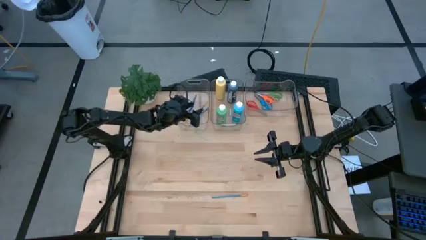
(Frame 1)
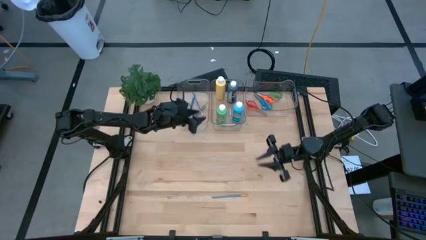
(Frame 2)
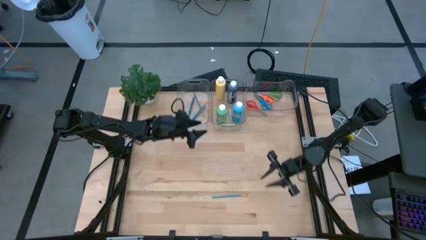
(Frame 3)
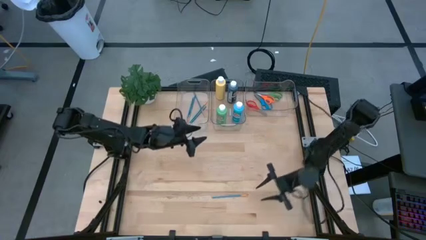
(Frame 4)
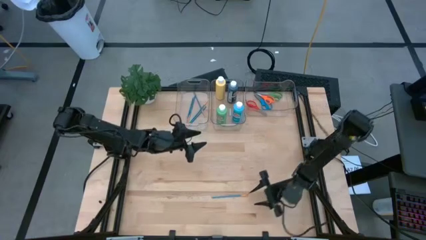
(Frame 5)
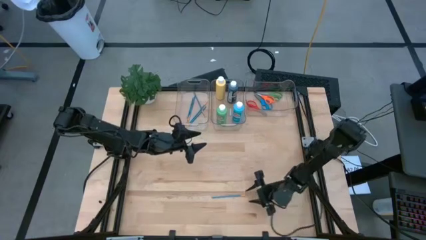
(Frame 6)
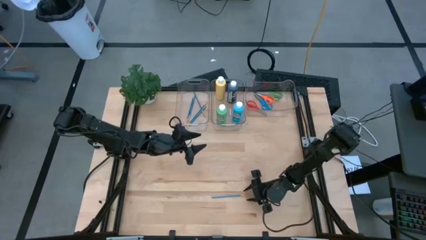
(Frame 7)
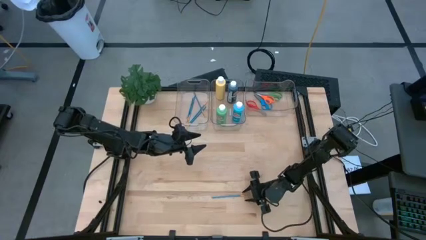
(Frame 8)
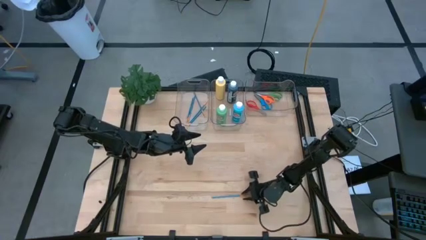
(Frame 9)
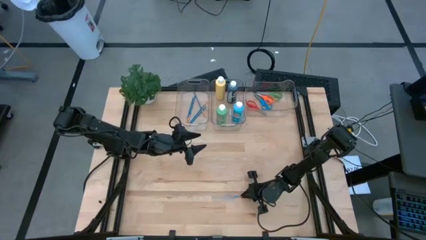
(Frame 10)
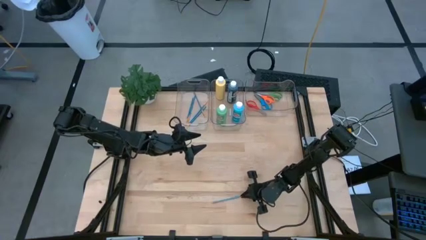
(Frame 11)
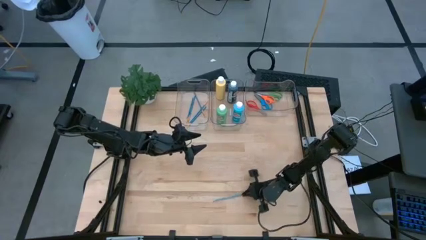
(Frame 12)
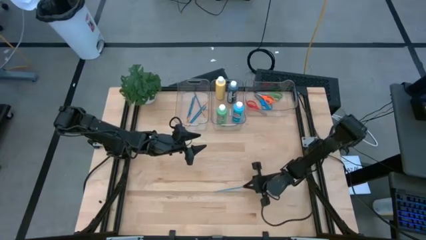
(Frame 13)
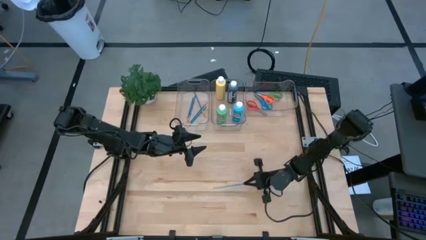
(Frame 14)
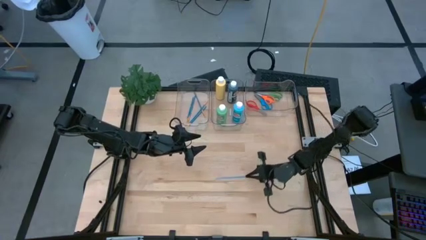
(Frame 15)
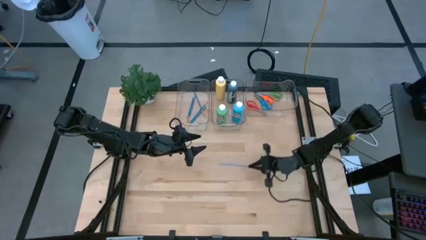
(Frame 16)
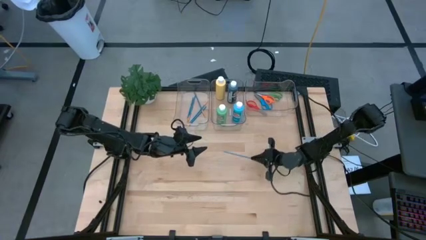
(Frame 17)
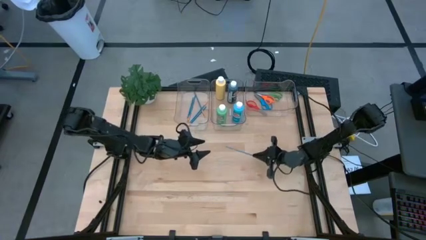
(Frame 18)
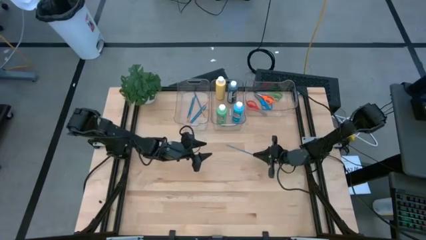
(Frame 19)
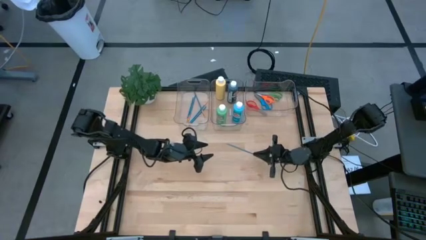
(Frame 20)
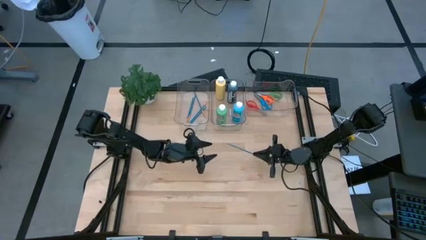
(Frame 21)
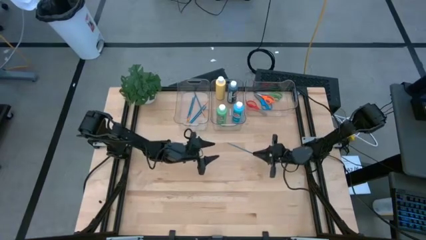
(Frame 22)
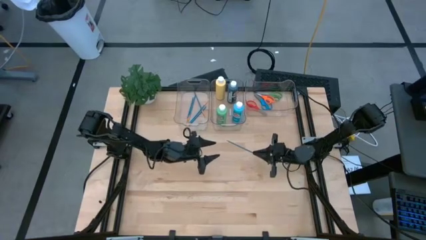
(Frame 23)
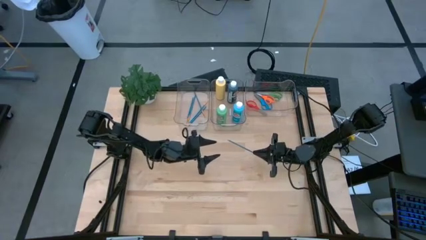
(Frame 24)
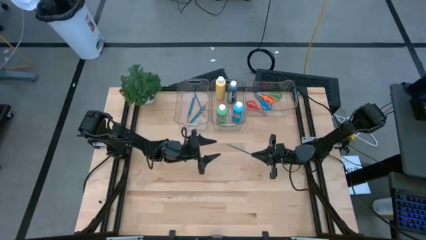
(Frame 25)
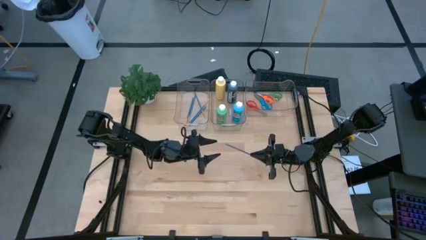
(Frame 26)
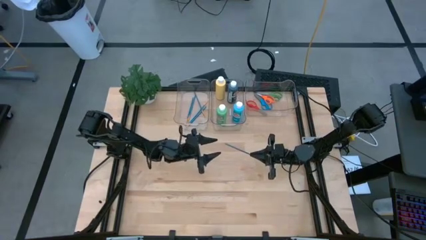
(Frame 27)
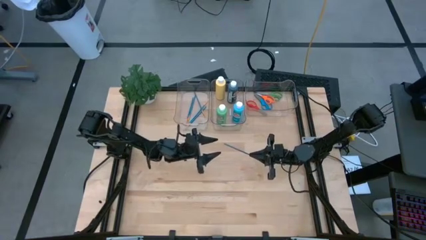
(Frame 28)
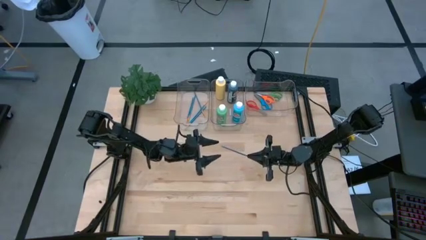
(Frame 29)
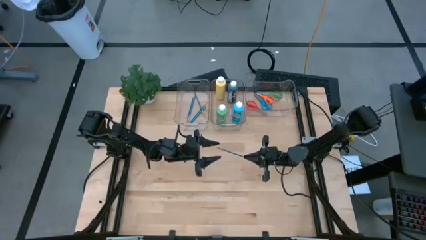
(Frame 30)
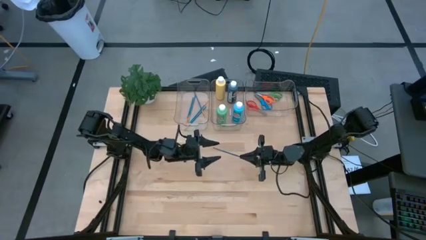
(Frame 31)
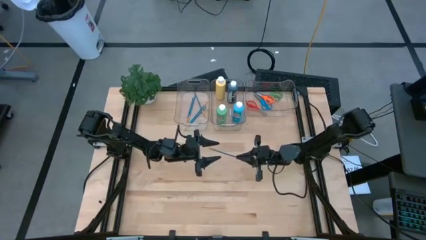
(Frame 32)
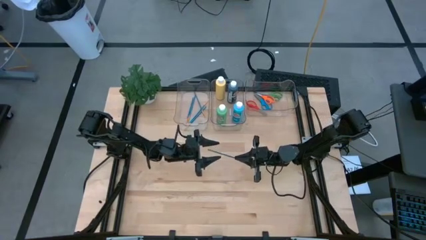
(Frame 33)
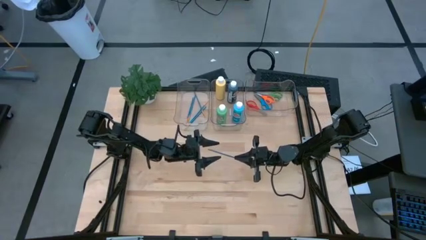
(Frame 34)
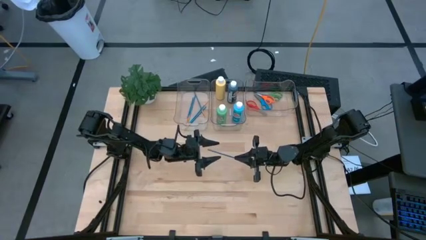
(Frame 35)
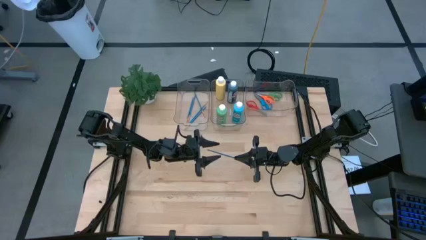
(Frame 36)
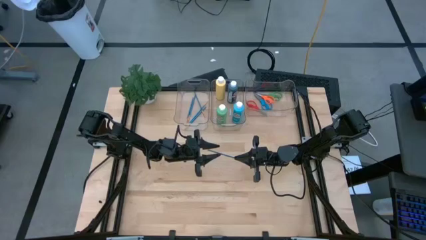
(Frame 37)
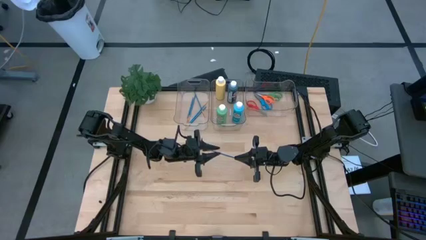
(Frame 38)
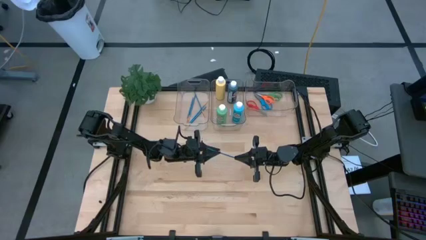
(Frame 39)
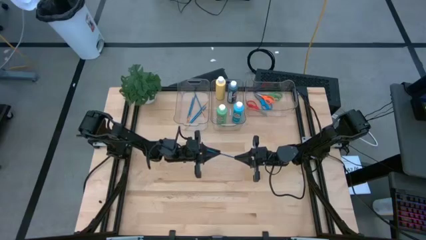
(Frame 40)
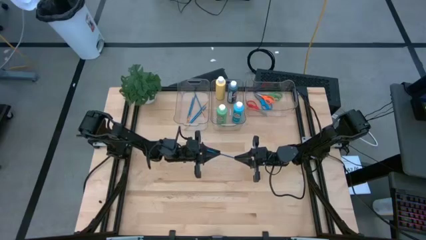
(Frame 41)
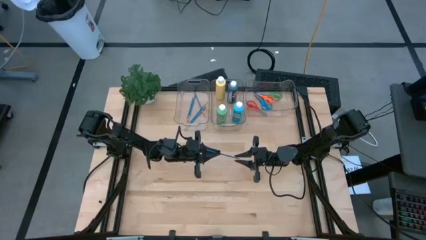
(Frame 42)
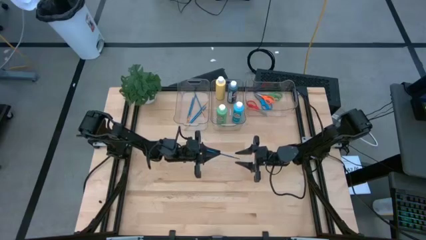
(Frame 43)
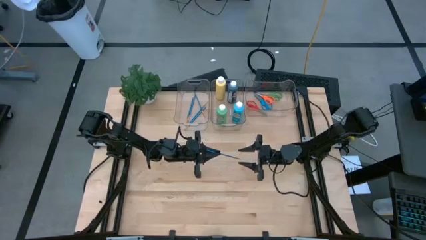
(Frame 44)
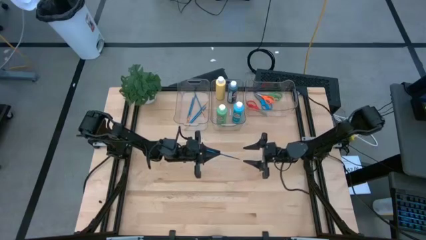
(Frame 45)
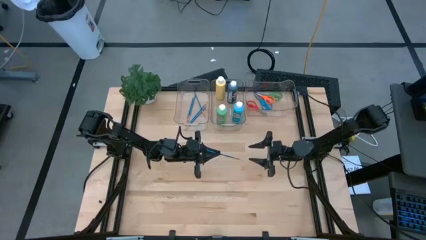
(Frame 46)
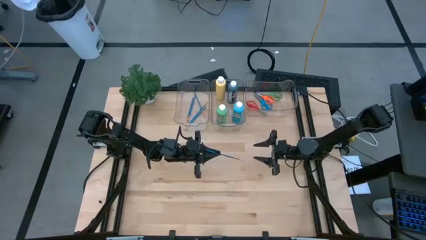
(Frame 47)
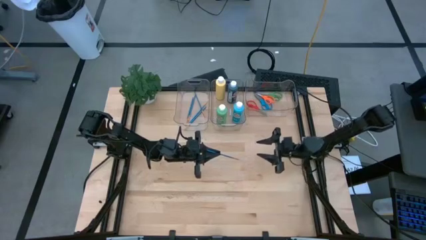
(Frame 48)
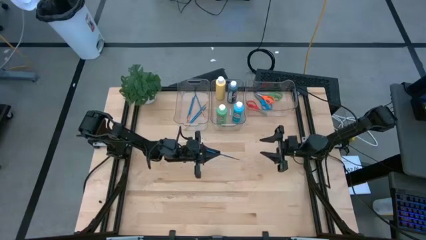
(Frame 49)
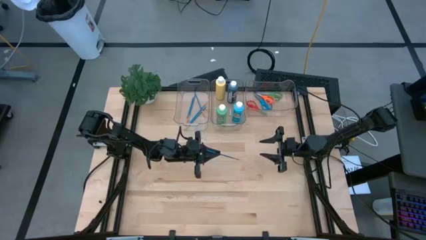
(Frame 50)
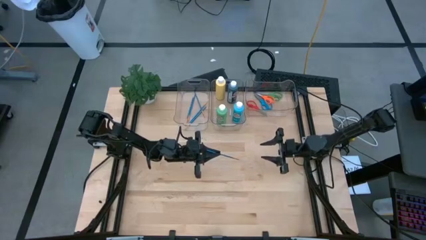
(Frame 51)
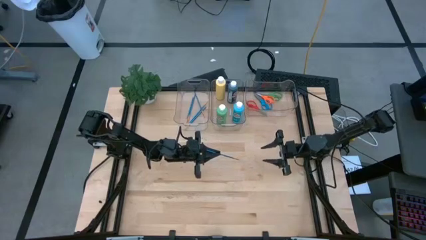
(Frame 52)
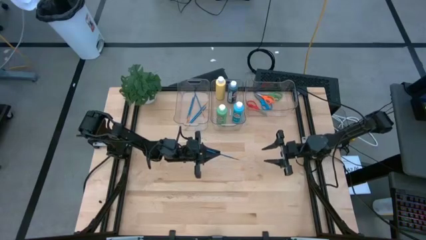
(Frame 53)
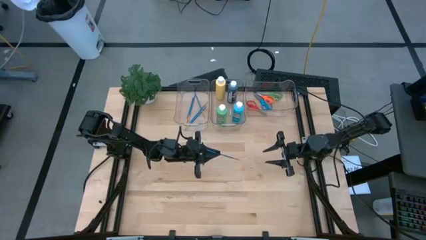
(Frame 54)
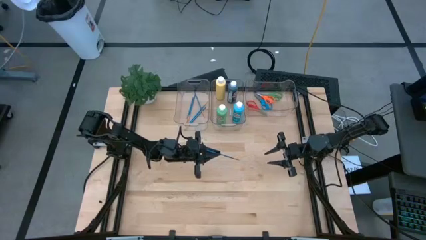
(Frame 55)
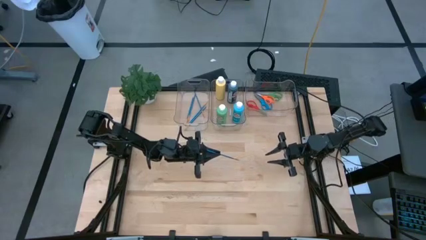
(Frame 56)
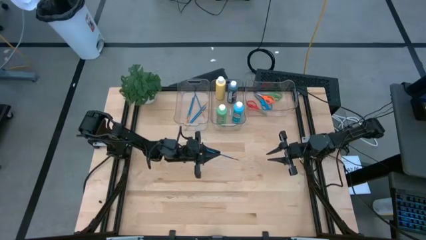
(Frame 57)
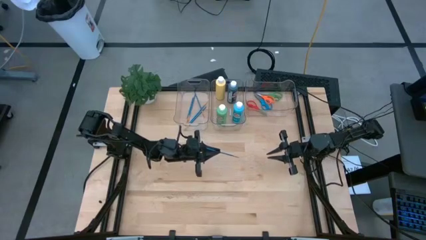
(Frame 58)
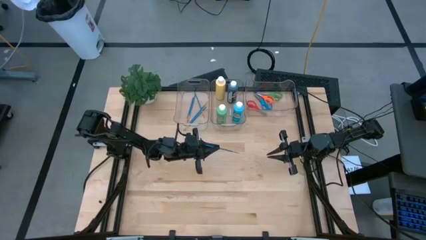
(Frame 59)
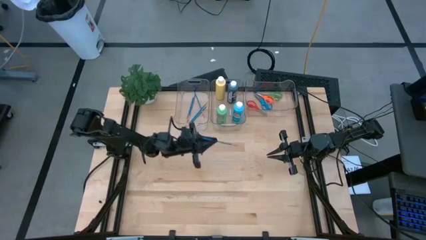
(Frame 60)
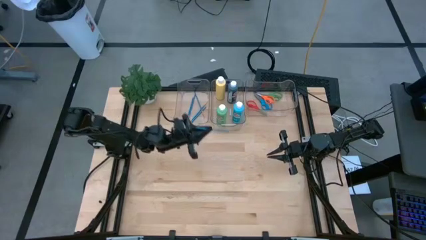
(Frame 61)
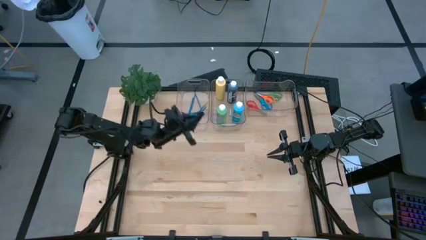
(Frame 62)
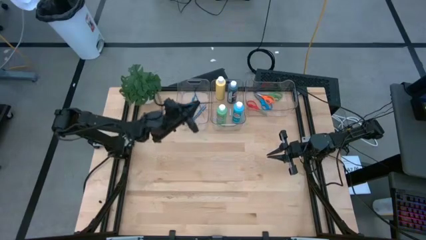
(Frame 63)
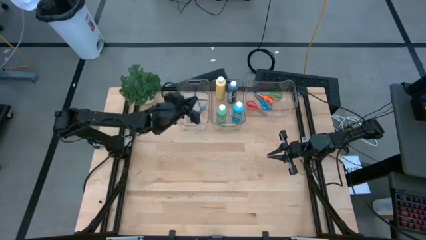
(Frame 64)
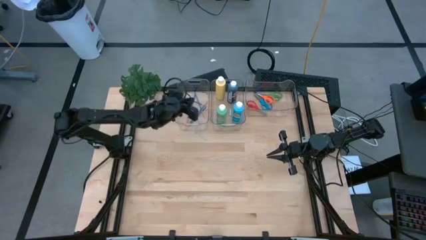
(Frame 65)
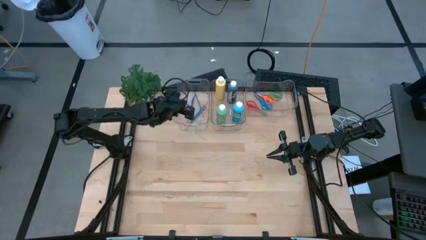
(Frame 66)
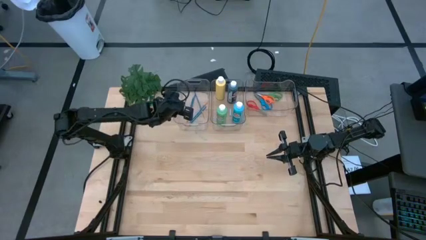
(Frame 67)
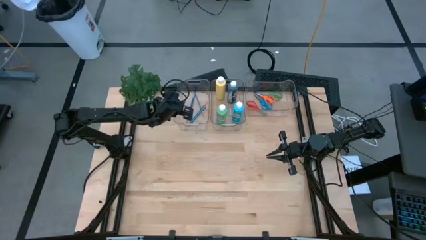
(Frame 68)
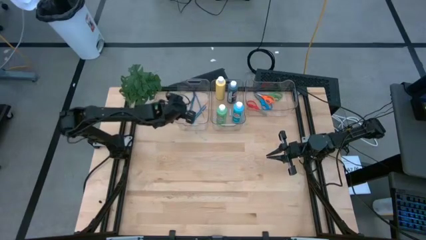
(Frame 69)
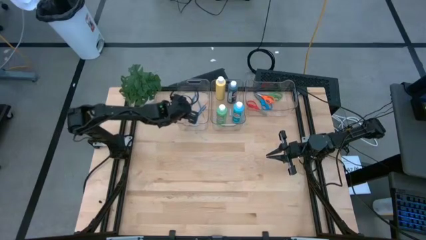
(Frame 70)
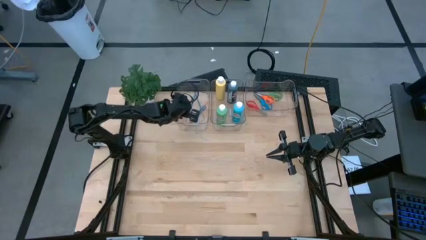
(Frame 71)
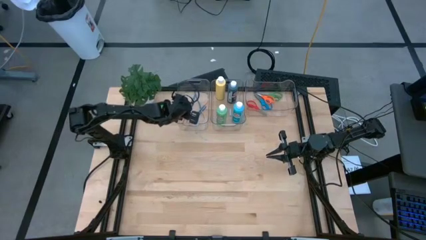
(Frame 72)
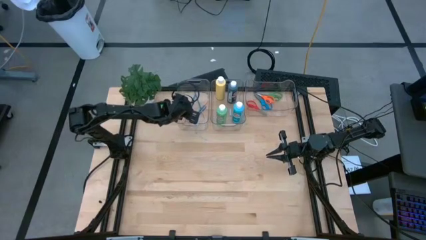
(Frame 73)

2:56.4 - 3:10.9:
Task: Pick & Place Paint Supplies
Put the blue paint brush into the left transparent bin

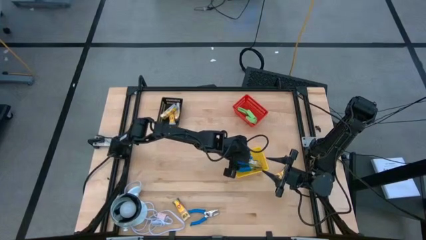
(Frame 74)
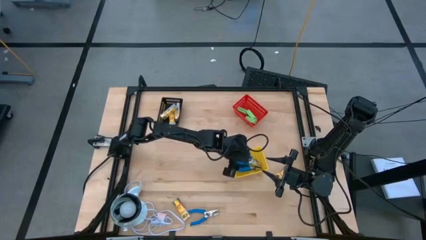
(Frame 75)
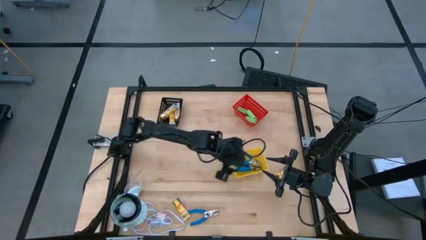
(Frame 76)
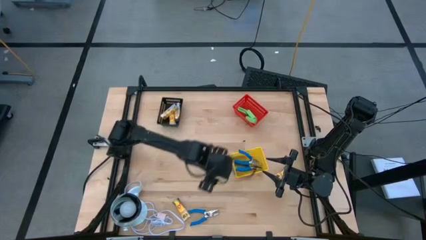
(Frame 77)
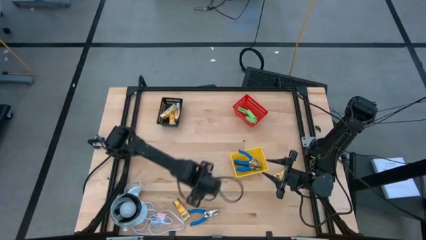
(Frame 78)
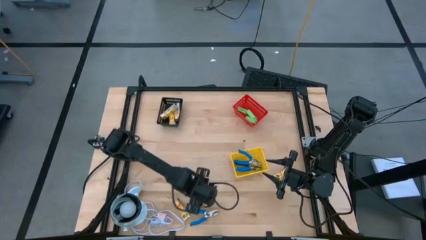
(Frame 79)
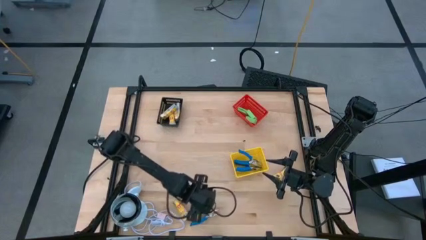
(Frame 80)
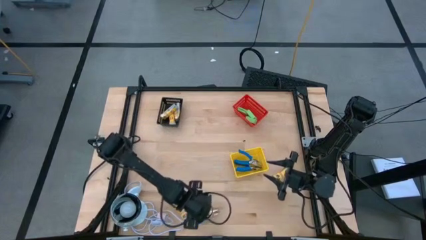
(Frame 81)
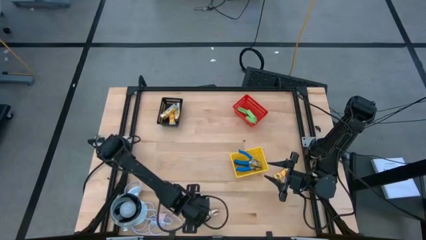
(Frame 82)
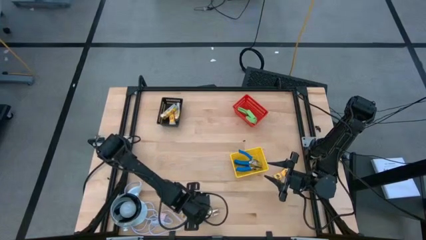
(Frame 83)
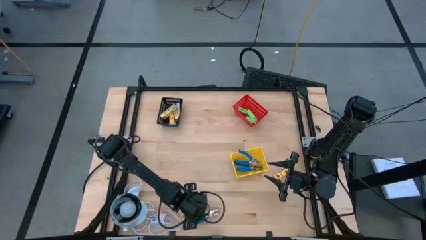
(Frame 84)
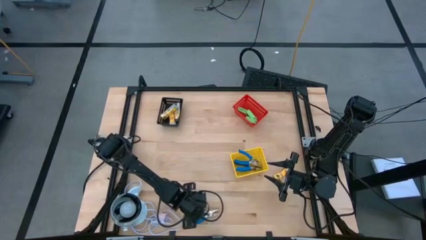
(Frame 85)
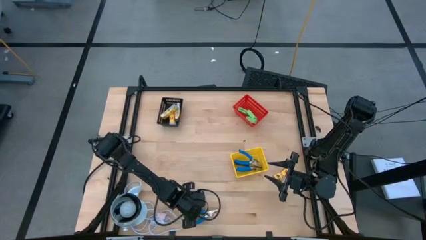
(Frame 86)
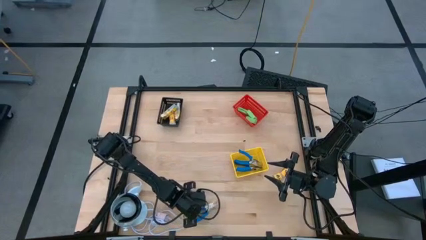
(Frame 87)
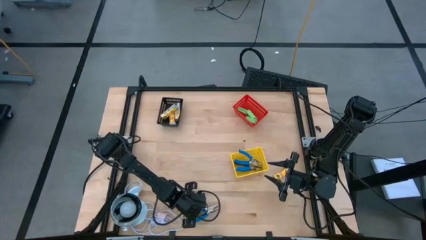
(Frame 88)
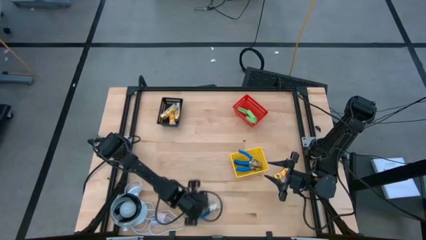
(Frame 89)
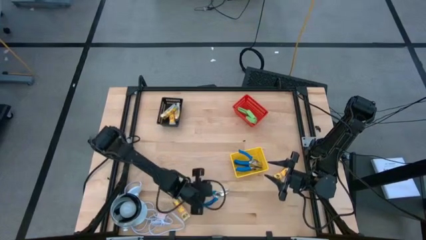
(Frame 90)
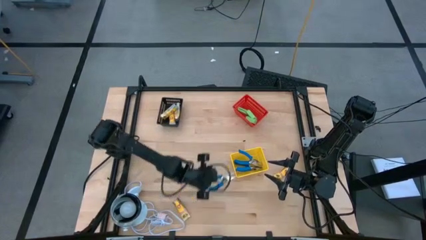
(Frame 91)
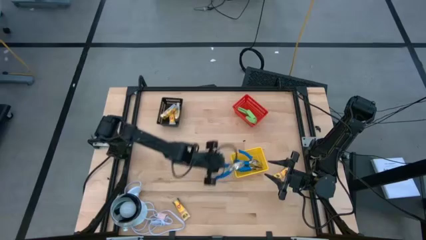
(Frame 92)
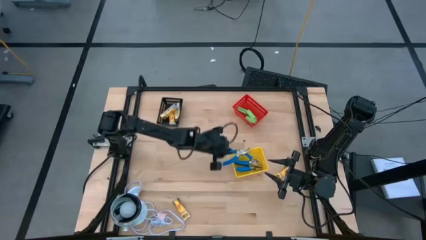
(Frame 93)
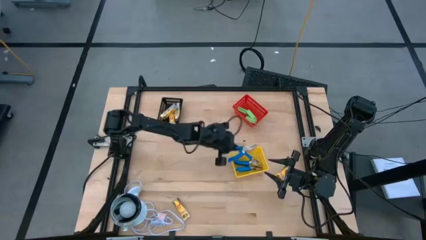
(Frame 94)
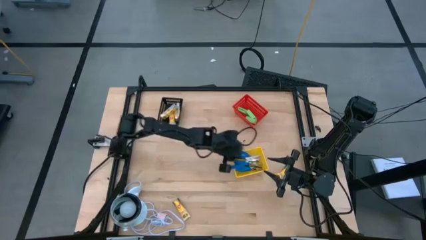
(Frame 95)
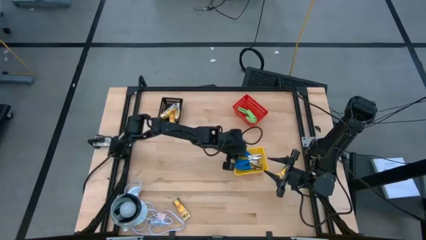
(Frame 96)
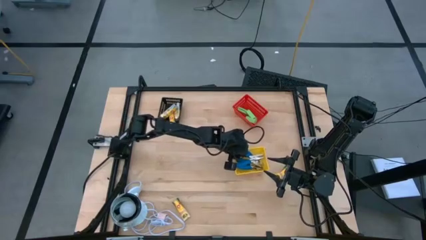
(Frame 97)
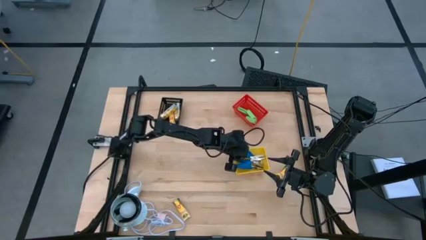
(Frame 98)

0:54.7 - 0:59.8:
Task: Pick & Place School Supplies
Put the blue punch plier into the yellow bin
